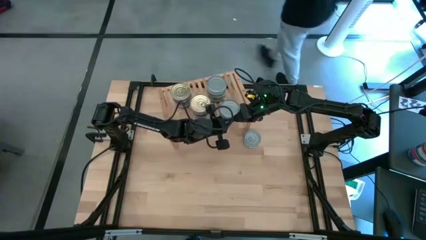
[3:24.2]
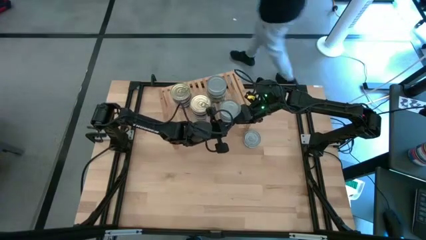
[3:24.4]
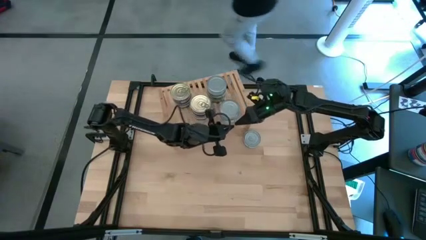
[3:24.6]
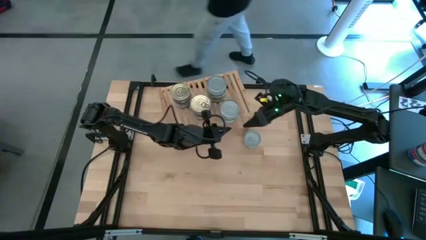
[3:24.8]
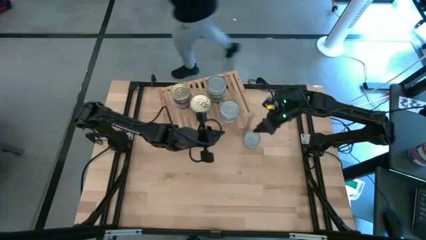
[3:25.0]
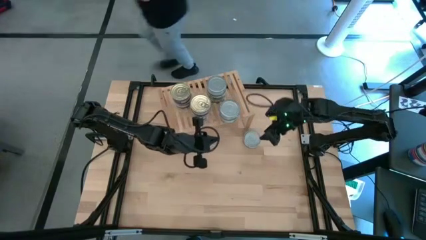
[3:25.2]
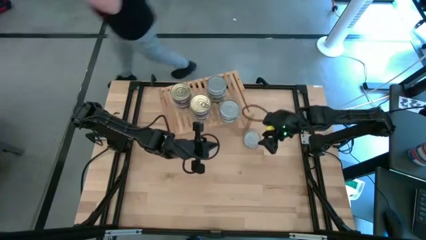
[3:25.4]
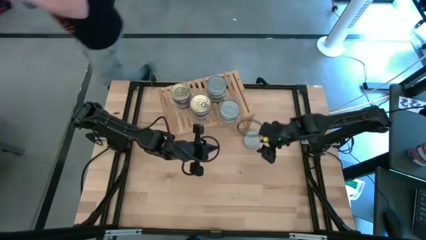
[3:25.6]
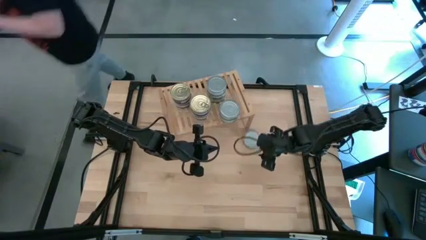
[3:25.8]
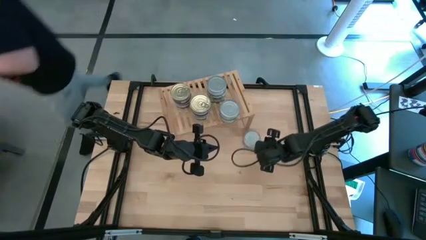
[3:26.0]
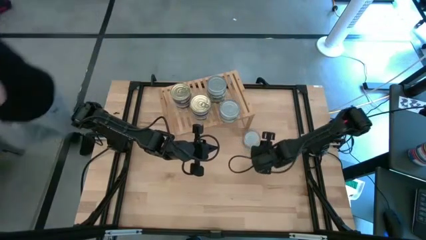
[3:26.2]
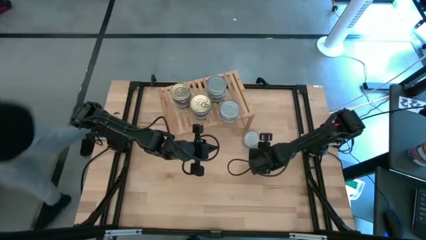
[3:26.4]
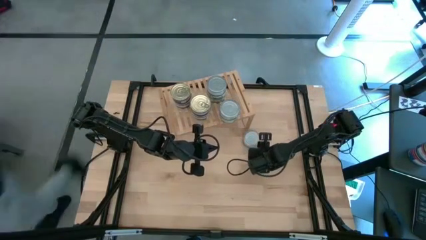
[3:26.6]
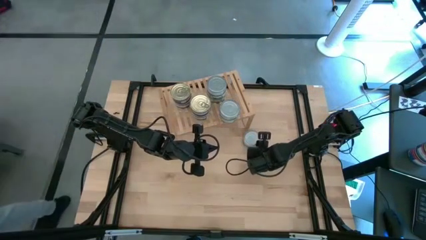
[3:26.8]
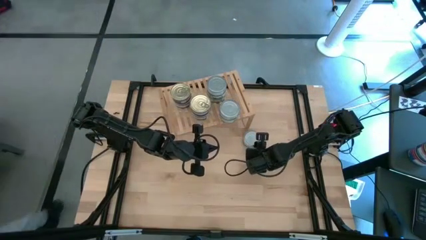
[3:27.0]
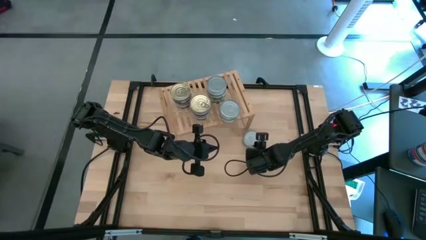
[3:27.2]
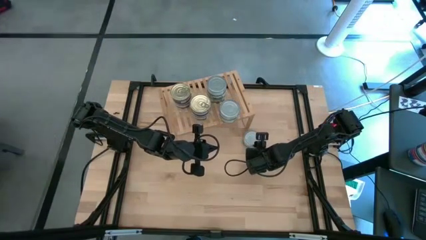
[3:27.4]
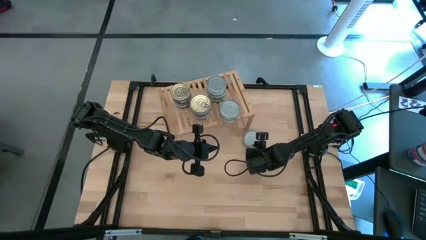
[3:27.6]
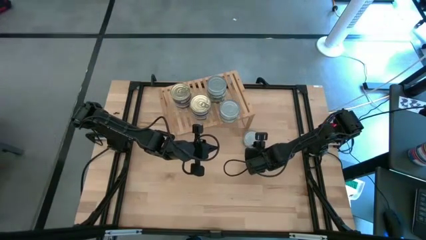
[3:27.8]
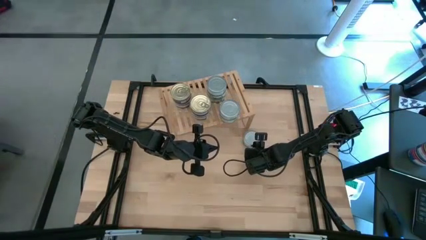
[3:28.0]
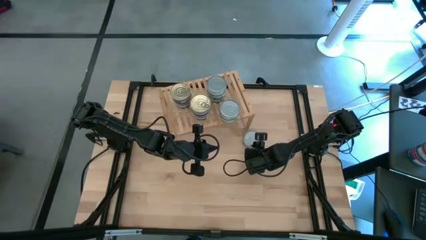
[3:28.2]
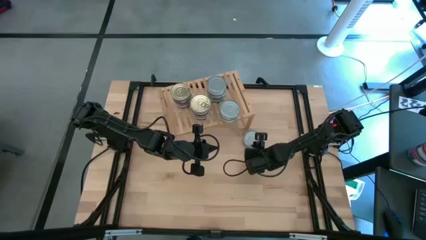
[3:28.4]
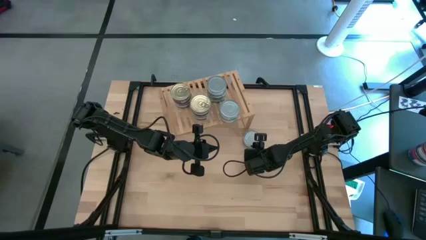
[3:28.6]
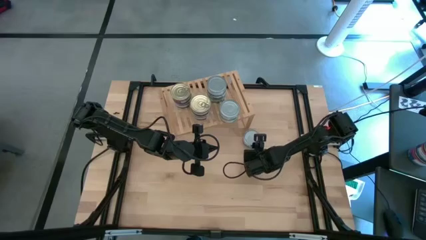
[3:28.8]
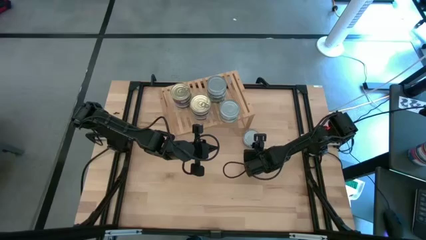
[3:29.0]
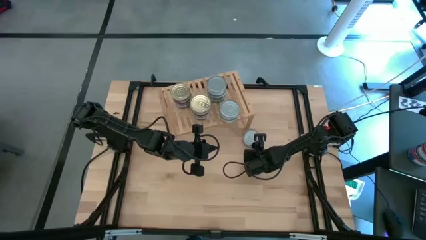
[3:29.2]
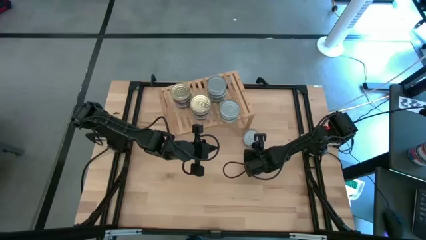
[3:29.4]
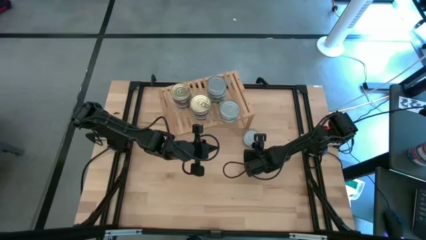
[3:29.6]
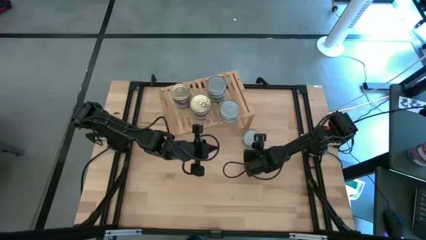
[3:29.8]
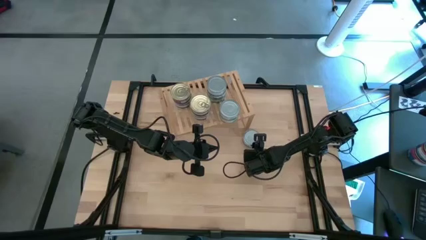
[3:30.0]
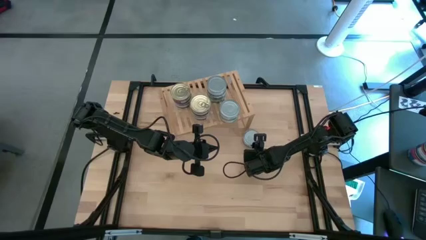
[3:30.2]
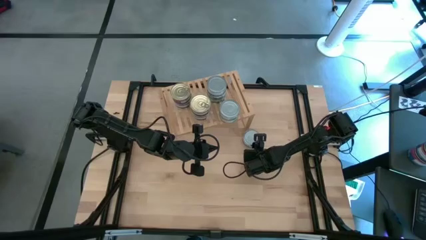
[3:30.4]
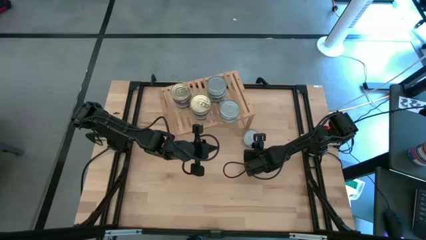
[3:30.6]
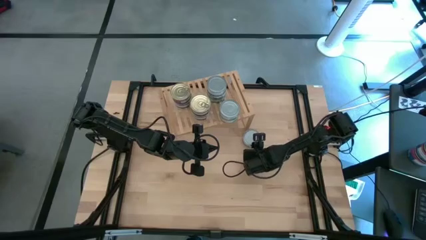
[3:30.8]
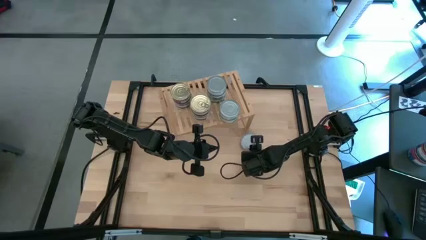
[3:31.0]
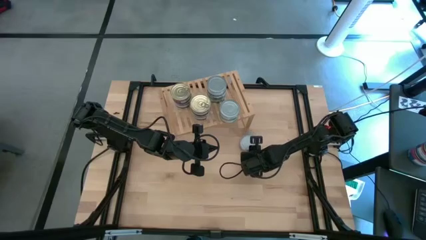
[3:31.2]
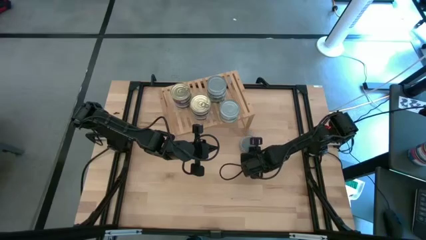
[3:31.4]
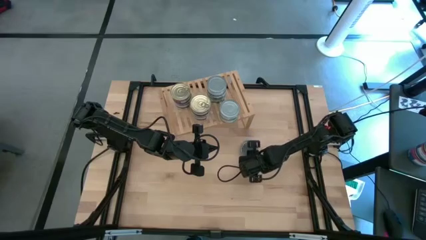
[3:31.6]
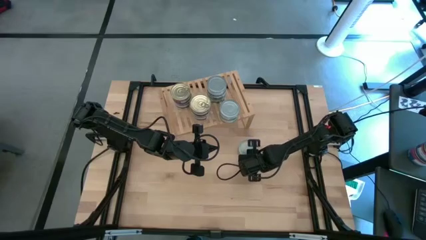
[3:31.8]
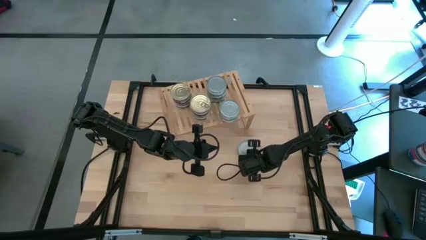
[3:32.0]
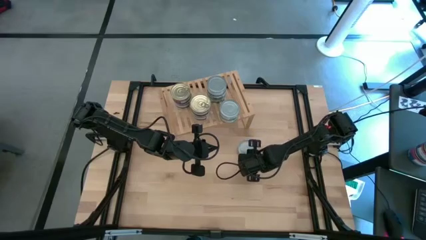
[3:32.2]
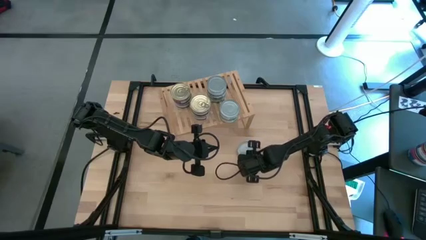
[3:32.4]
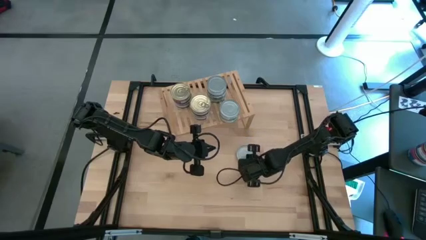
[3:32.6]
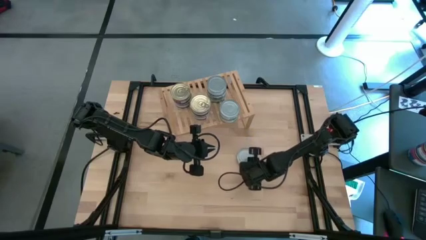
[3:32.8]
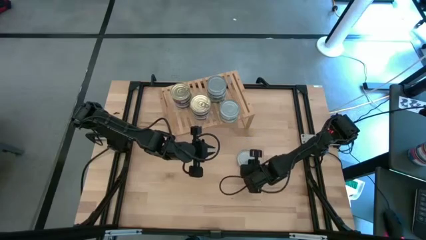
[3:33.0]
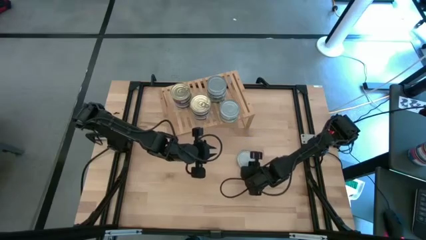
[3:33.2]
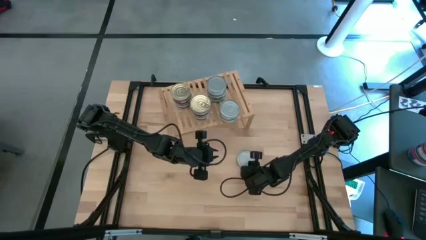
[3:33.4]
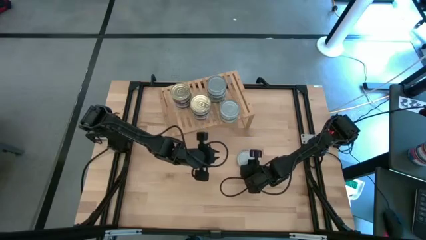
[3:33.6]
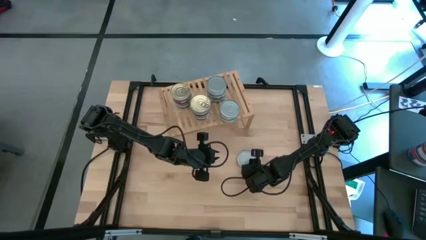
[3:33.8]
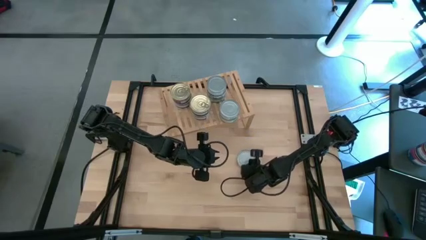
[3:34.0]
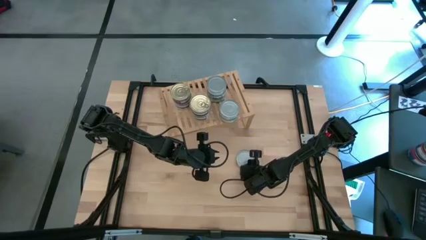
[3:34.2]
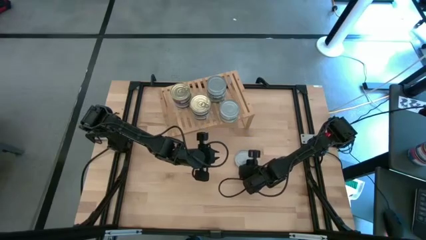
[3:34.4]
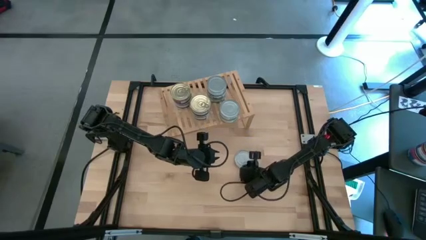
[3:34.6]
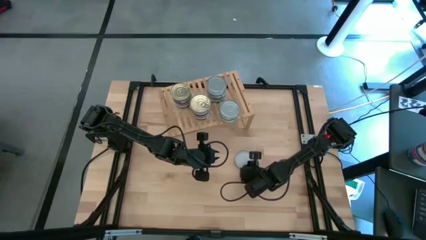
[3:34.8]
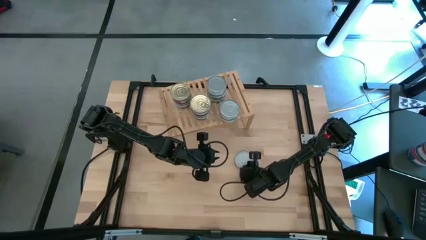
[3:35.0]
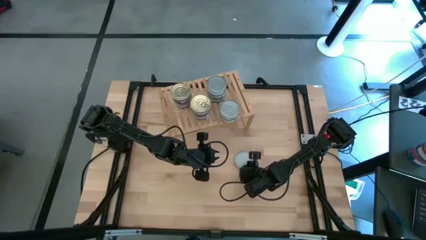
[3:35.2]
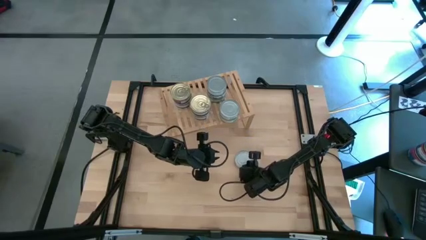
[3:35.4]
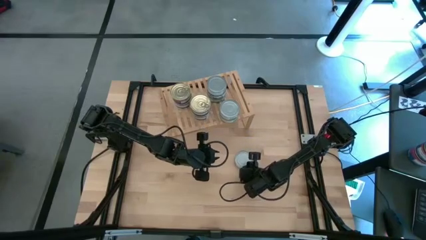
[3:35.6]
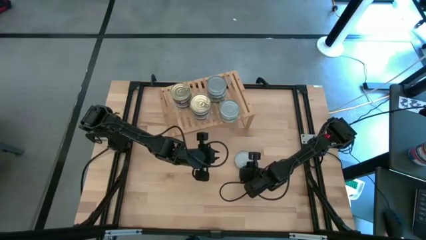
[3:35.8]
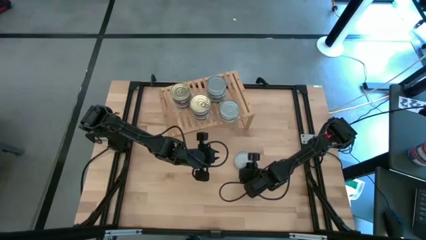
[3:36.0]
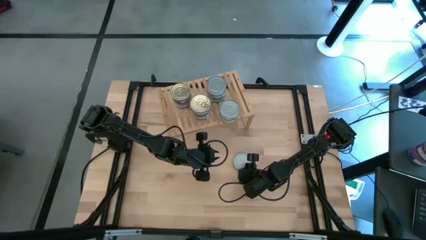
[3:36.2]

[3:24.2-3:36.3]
Task: Stack canned seafood by type on shelf
Stack the green tuna can on top of the green tuna can on the shelf
